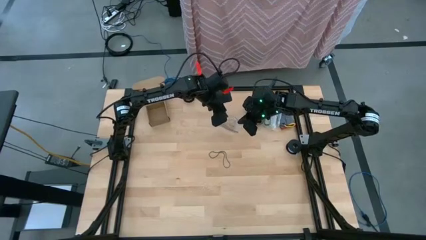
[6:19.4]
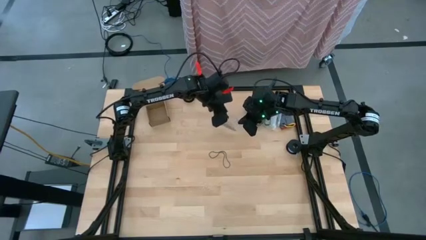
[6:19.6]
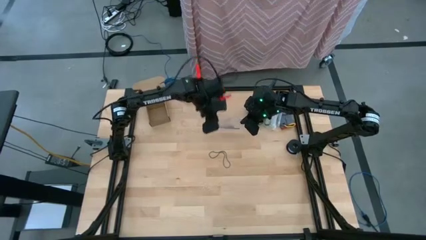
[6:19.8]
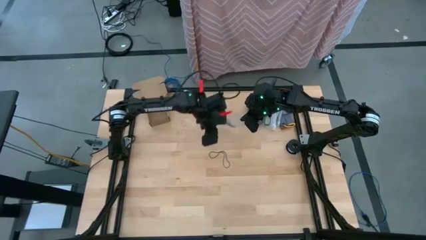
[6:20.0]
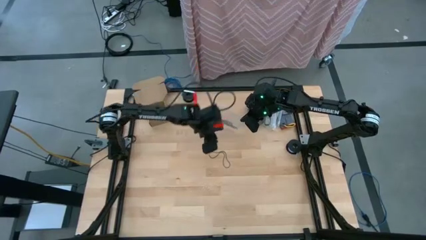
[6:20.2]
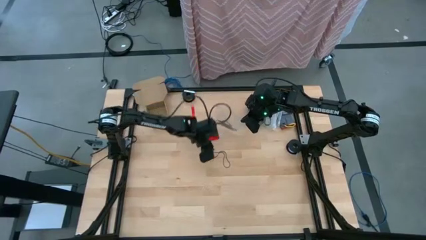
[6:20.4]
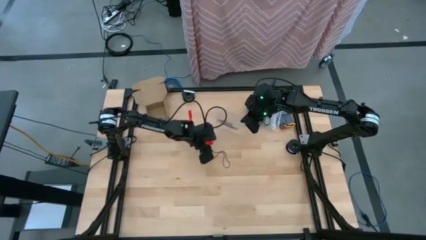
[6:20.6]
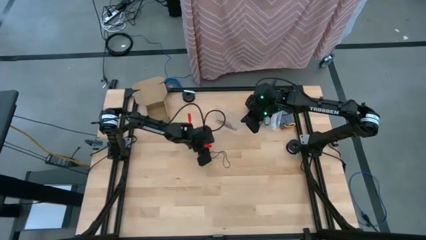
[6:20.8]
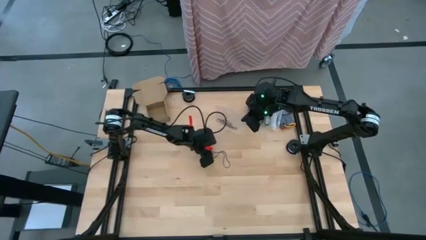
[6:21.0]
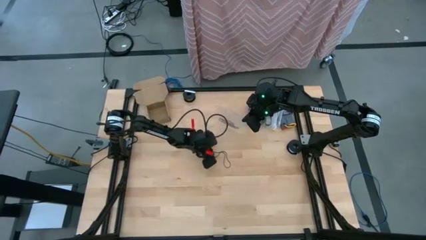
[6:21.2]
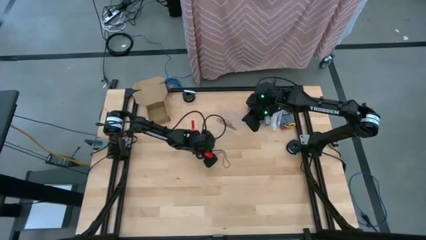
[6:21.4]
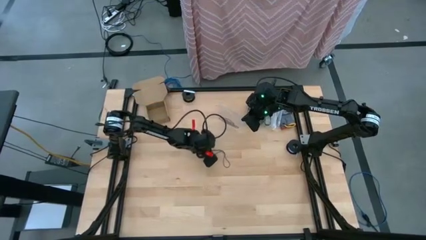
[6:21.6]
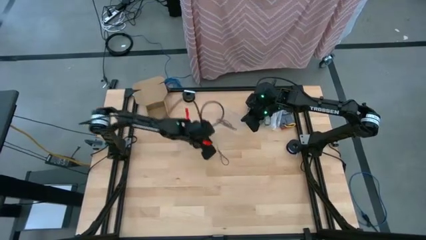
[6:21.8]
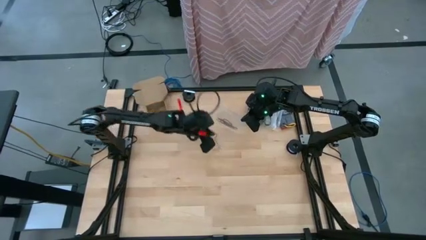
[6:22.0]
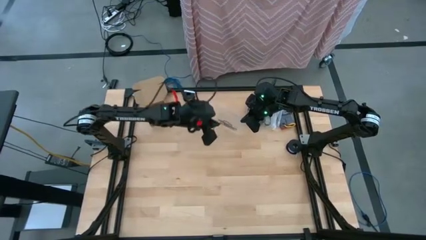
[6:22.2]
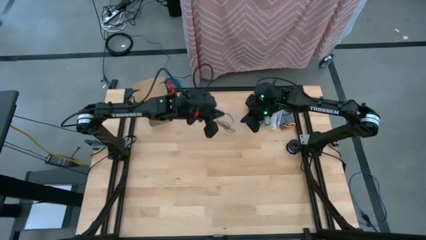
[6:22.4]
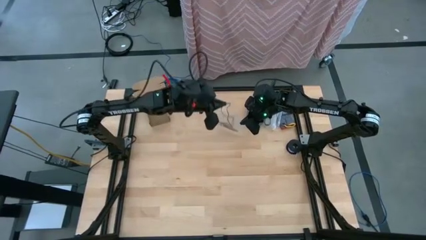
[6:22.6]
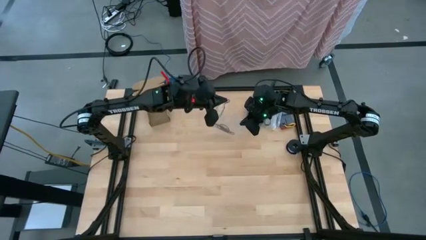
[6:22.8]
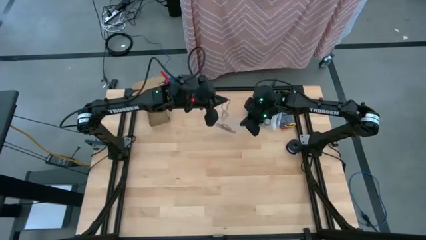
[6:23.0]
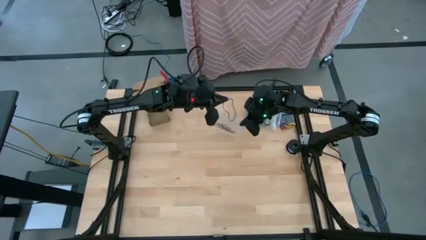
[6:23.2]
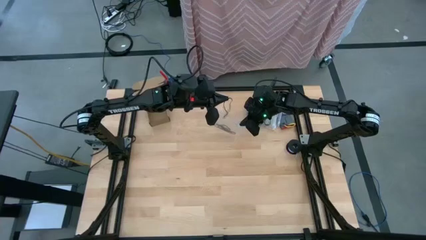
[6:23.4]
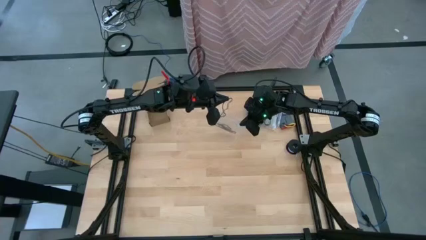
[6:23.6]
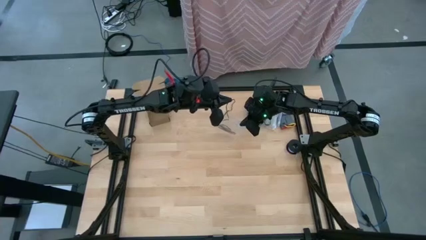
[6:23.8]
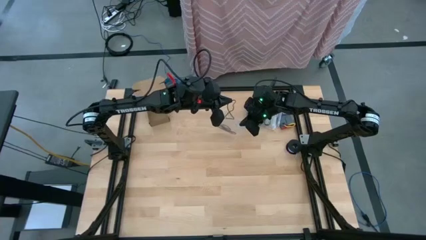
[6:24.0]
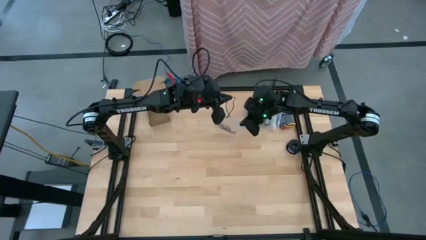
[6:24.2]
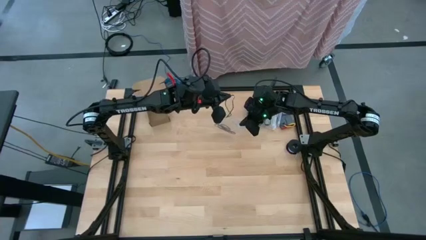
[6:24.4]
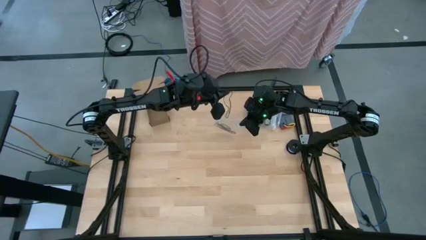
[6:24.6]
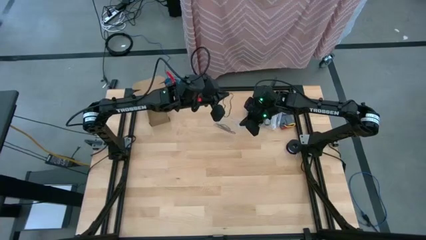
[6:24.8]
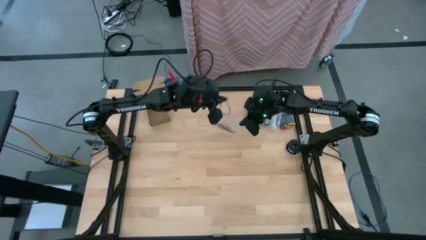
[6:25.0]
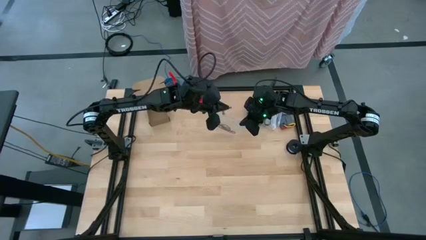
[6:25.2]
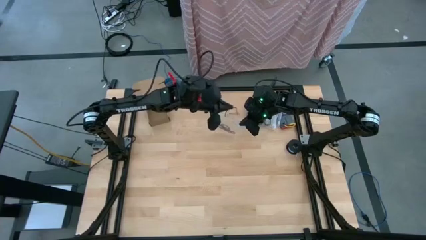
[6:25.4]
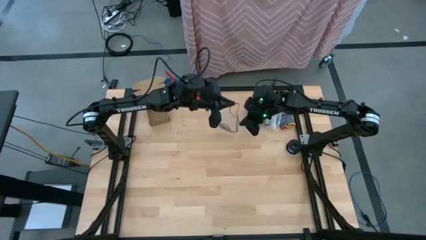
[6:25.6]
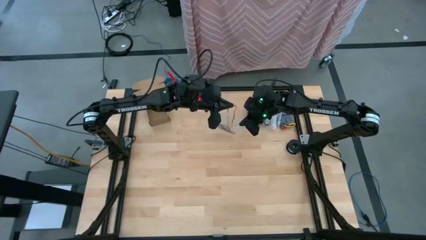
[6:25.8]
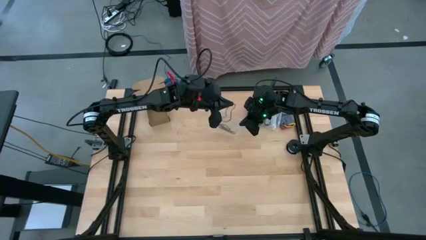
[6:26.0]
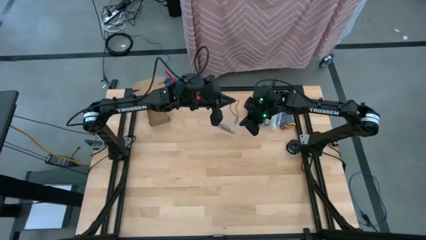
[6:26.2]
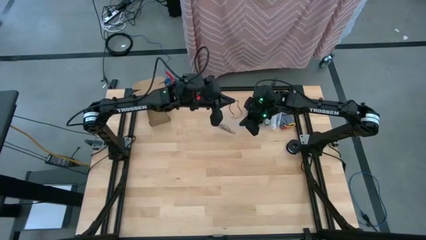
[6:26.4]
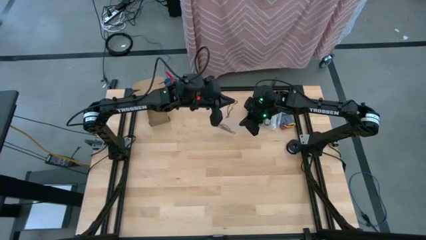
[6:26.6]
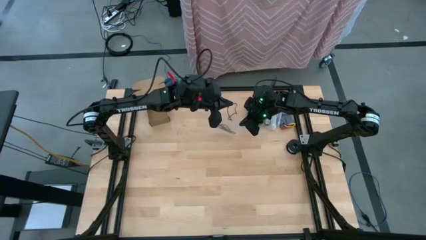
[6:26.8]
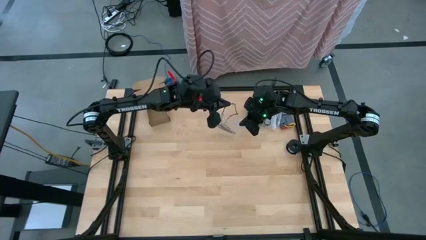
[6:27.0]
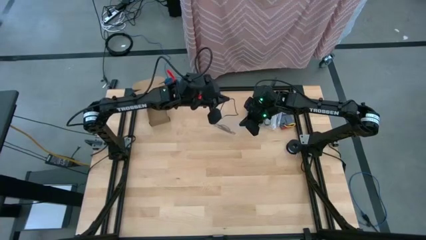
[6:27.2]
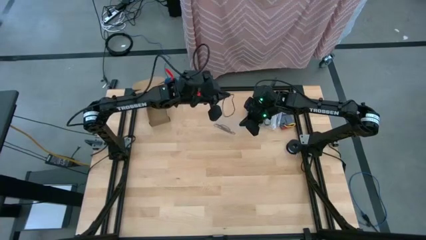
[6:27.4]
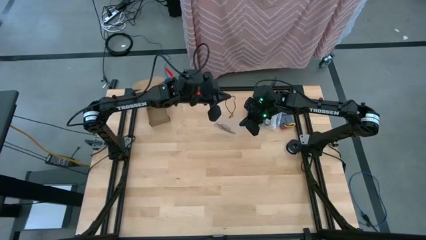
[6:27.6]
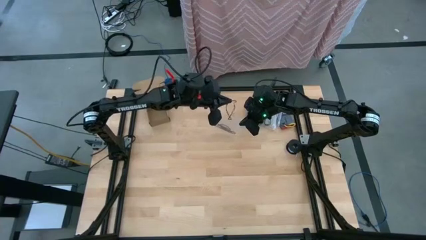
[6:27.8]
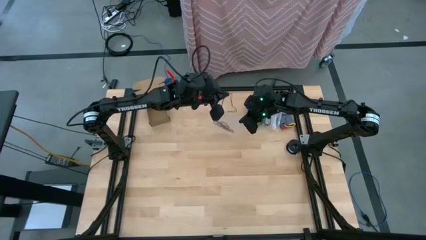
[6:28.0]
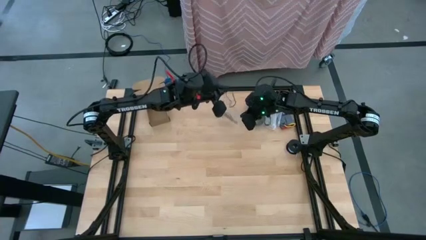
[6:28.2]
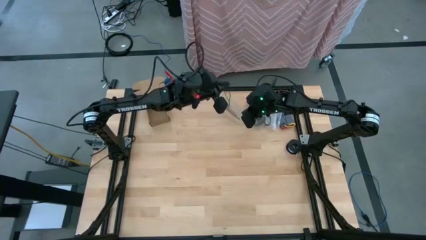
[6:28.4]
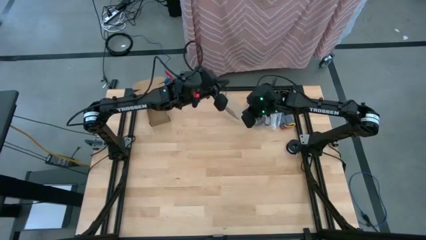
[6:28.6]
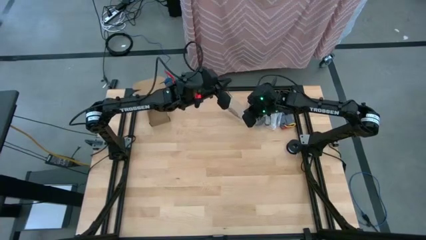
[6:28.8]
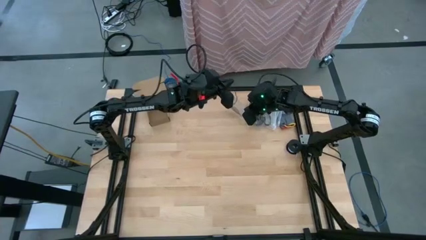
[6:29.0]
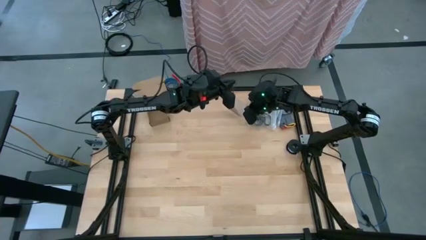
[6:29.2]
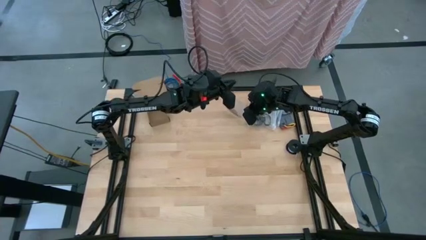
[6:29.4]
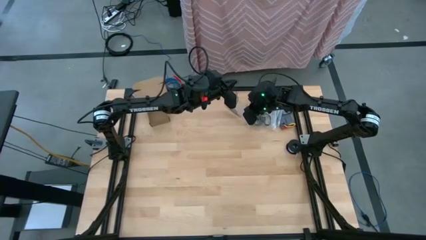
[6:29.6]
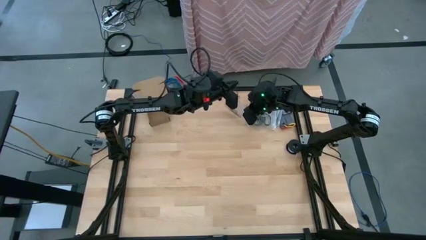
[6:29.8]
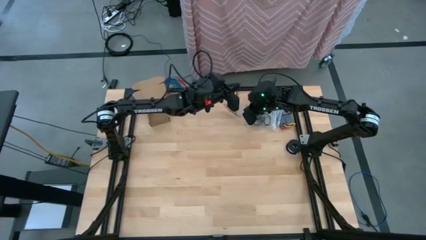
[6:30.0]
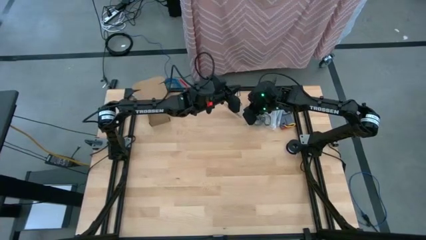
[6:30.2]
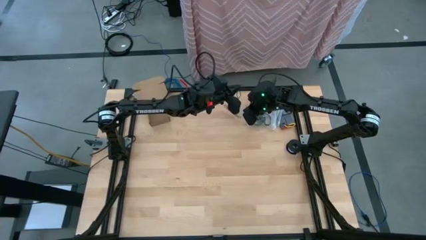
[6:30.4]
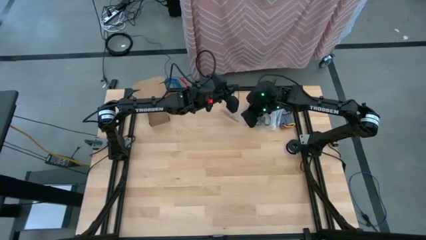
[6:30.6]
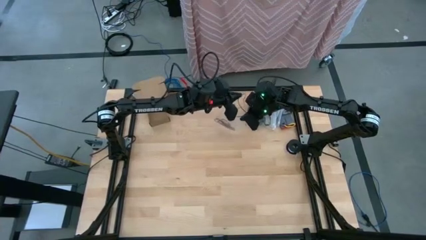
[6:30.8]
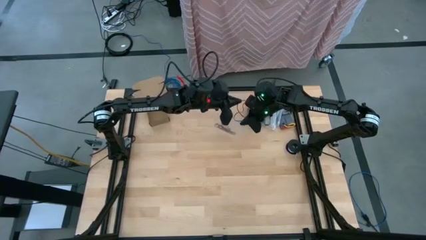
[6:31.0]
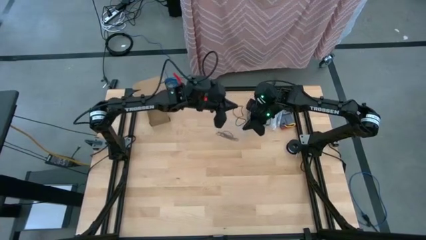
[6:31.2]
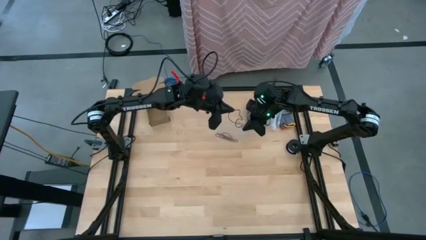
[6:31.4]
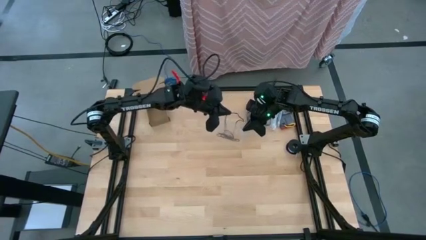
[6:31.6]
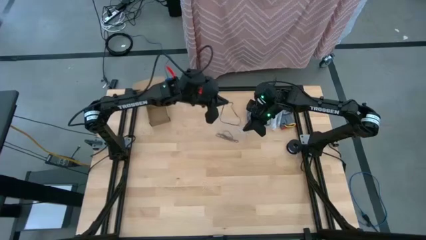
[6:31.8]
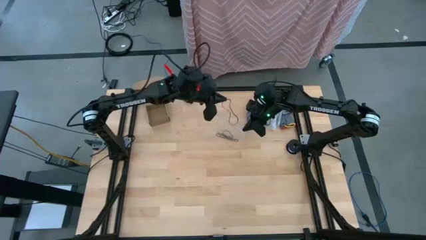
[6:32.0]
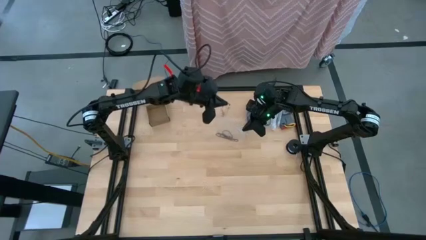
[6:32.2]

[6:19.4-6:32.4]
Task: Sort rubber bands
Put the black rubber band into the transparent zip bag

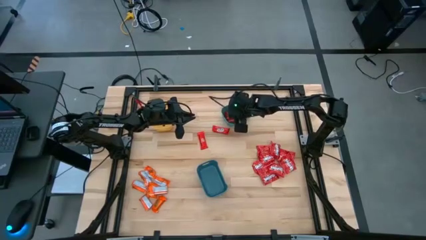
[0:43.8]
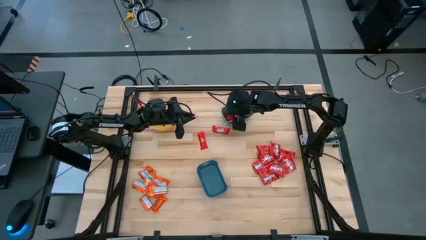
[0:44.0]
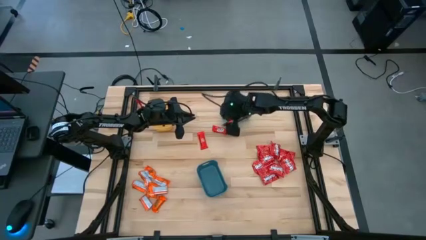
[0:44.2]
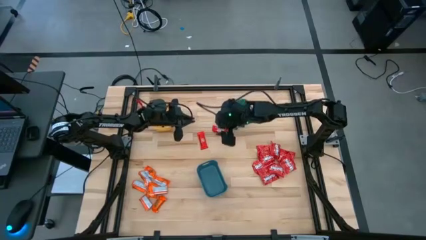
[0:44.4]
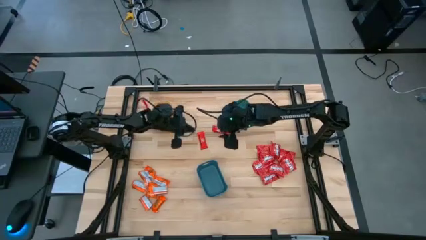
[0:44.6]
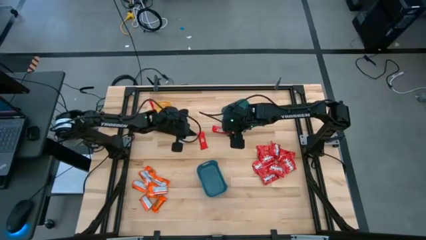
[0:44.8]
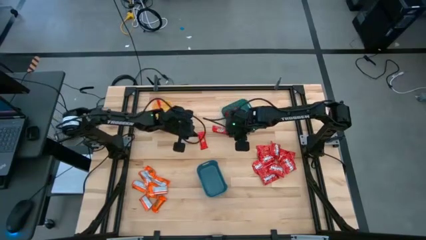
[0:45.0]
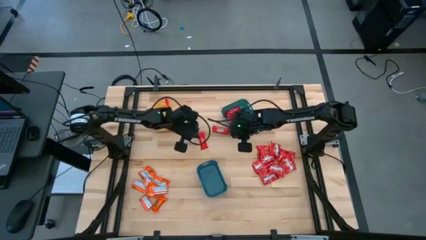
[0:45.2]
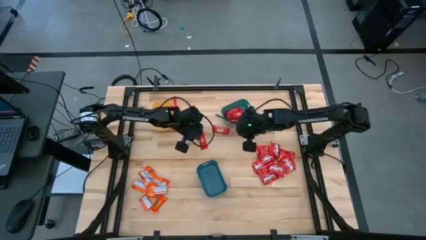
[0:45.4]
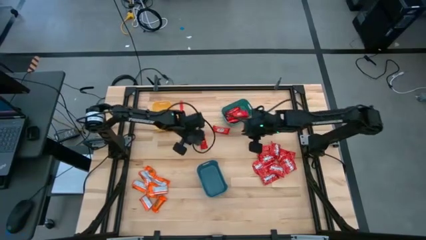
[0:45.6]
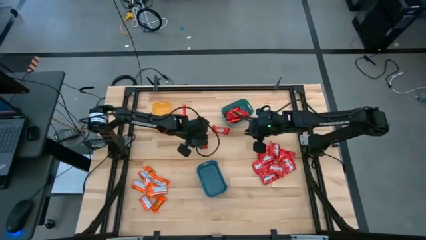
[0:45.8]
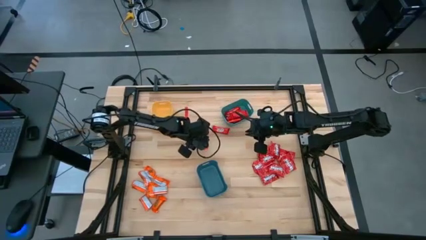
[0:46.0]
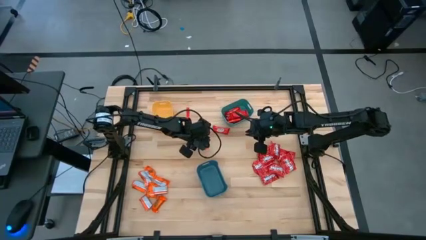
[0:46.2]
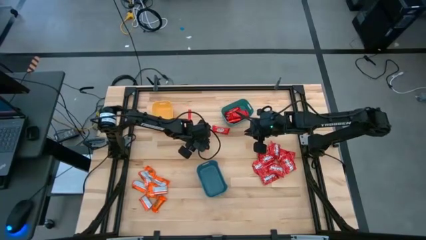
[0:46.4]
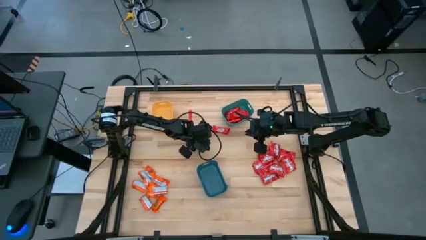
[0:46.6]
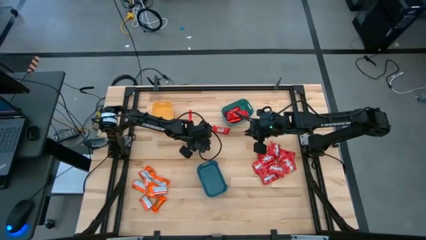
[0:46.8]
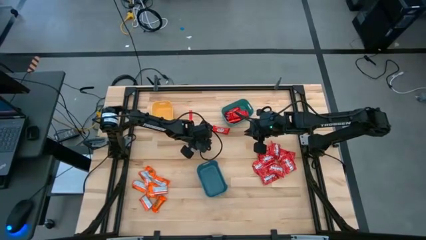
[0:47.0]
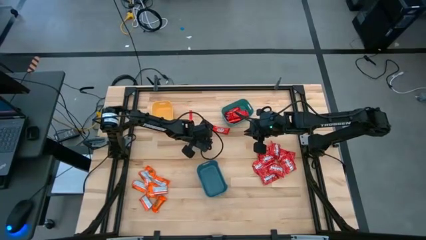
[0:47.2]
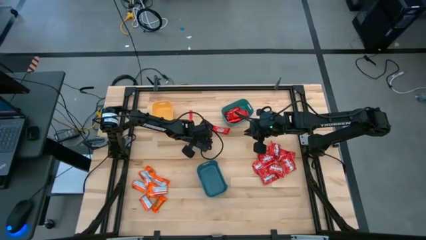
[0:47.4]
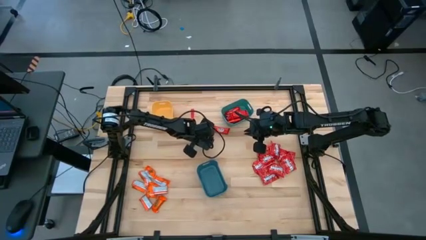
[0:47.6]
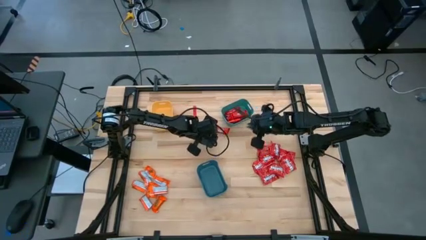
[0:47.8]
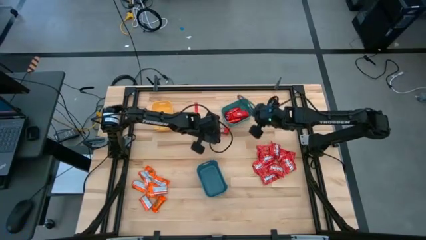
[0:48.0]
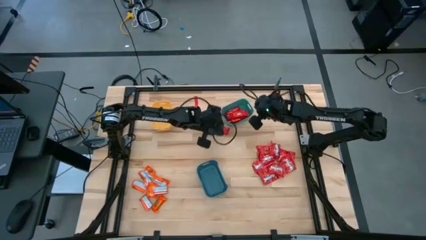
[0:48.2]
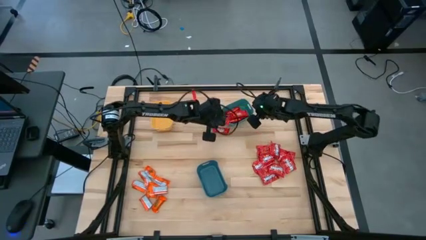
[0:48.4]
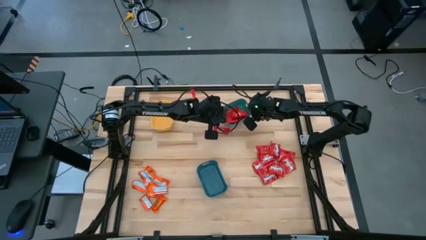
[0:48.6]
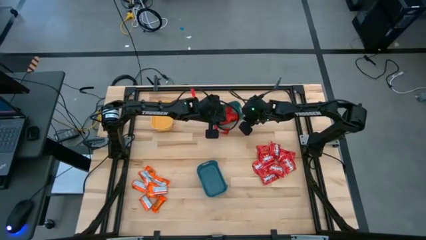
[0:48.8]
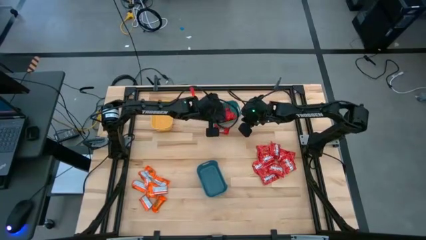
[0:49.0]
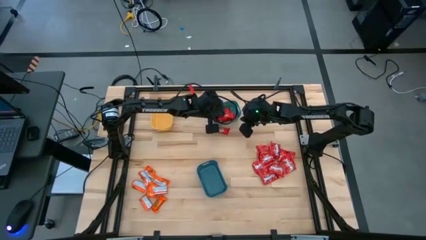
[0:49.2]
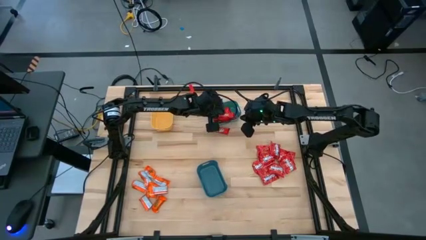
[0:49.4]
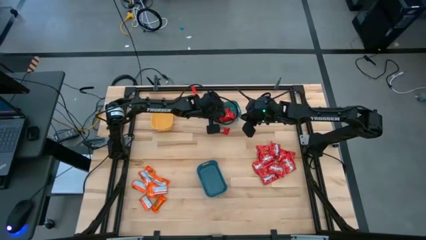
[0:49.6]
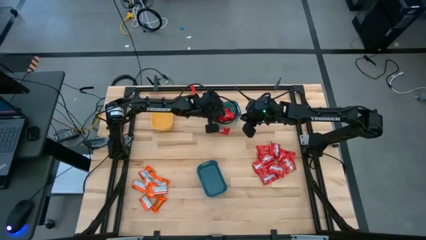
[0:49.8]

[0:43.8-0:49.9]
Task: Sort candy
Put the red chocolate bar into the green bin
